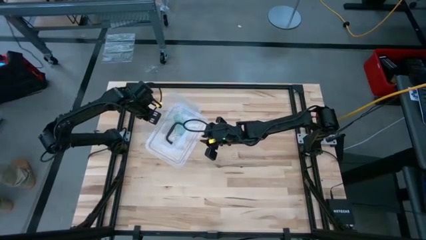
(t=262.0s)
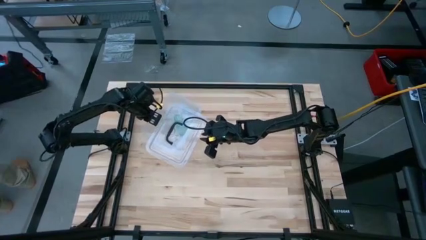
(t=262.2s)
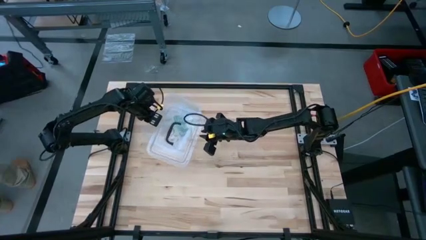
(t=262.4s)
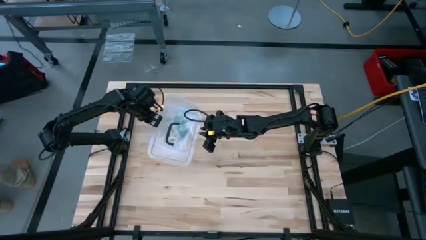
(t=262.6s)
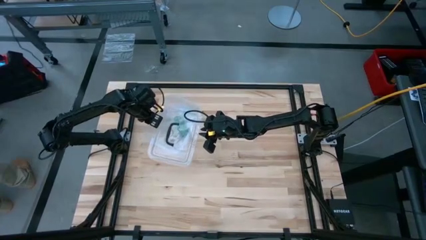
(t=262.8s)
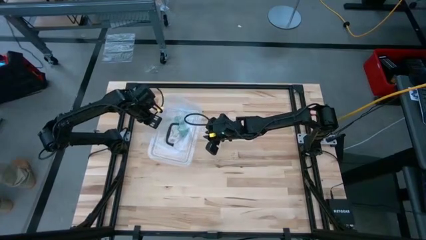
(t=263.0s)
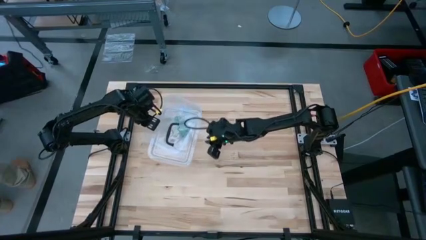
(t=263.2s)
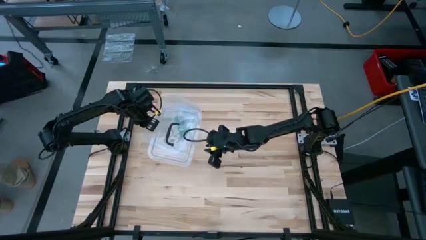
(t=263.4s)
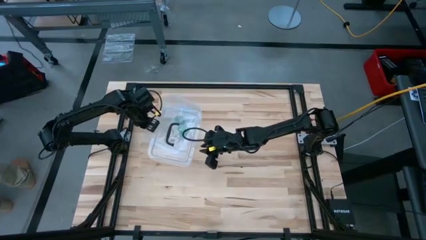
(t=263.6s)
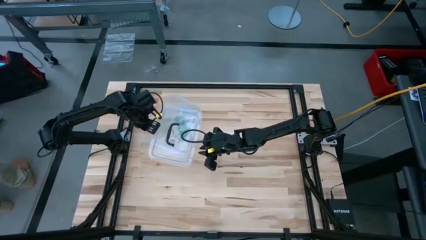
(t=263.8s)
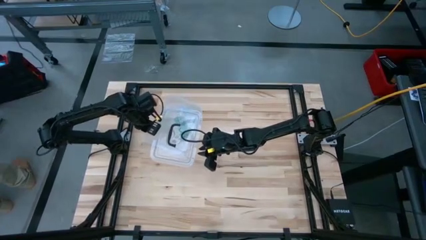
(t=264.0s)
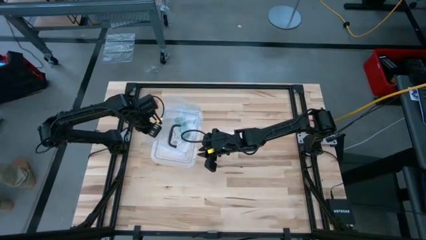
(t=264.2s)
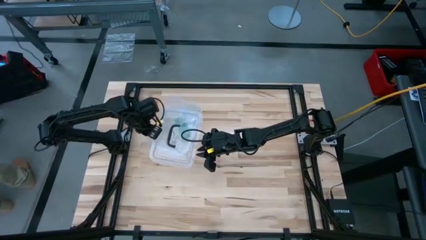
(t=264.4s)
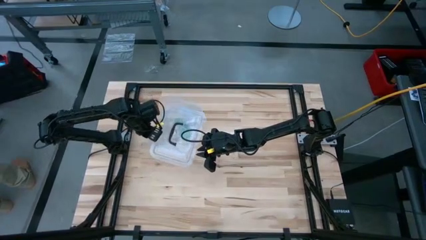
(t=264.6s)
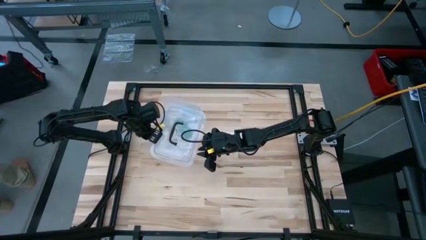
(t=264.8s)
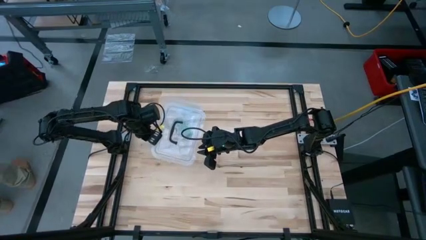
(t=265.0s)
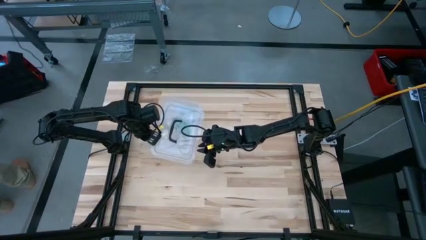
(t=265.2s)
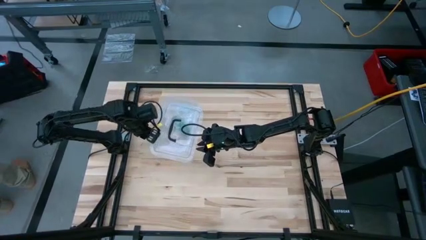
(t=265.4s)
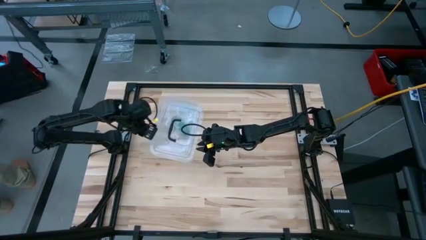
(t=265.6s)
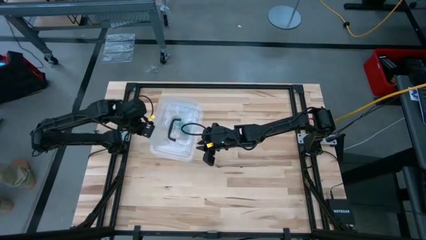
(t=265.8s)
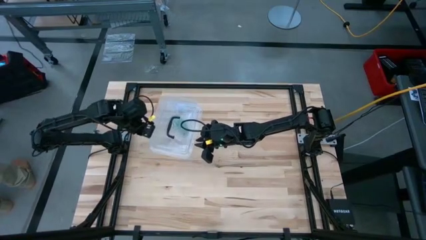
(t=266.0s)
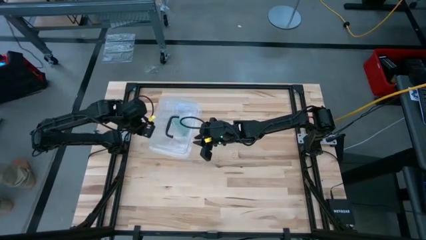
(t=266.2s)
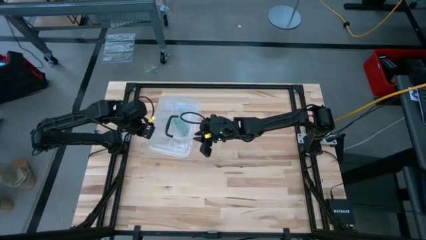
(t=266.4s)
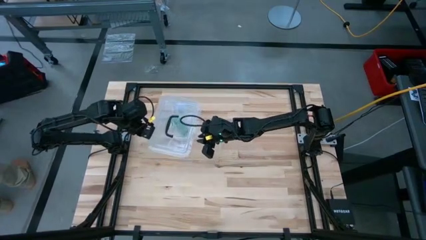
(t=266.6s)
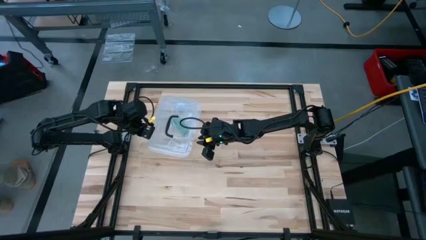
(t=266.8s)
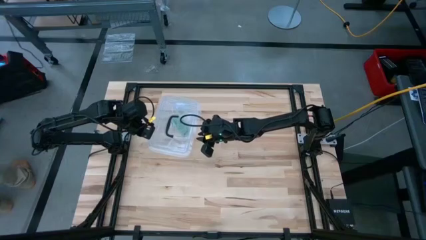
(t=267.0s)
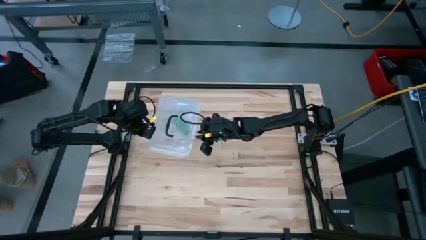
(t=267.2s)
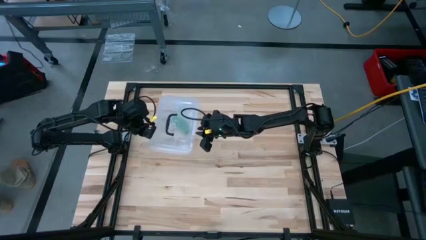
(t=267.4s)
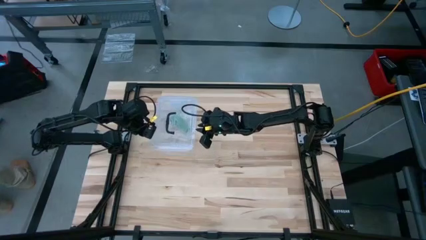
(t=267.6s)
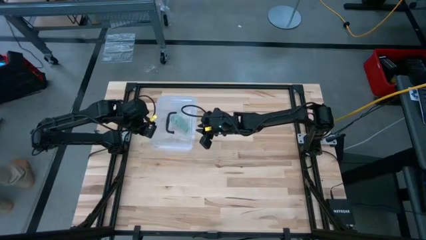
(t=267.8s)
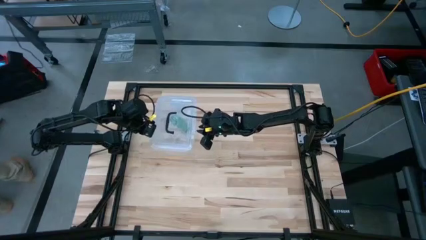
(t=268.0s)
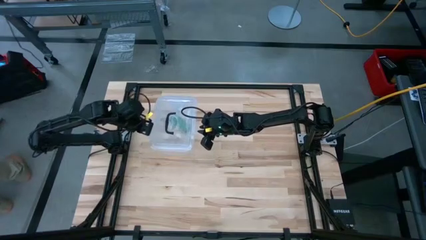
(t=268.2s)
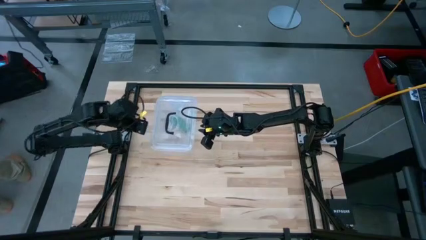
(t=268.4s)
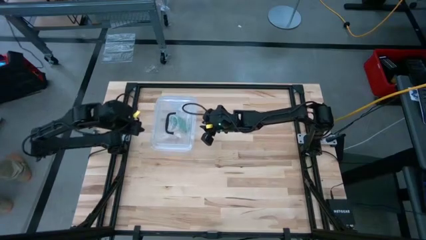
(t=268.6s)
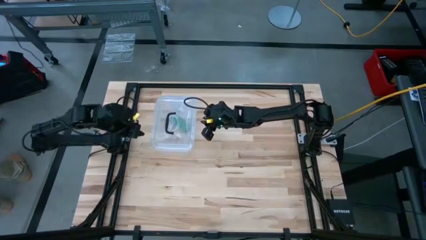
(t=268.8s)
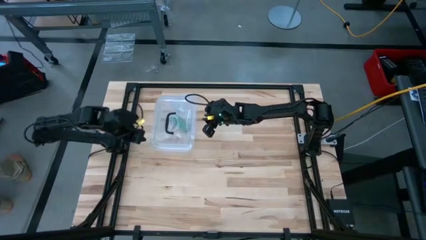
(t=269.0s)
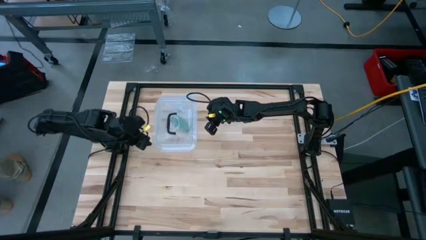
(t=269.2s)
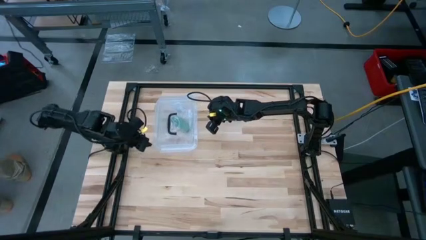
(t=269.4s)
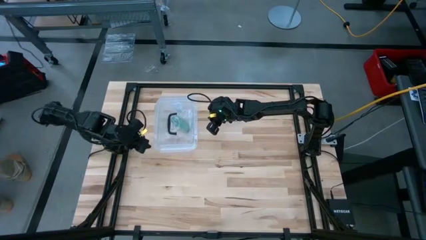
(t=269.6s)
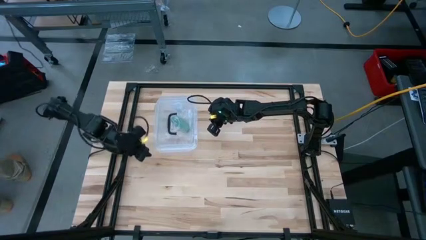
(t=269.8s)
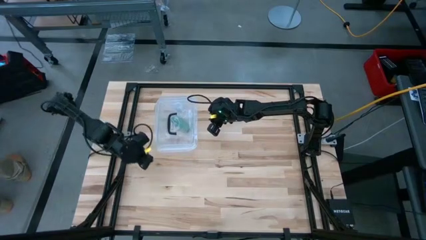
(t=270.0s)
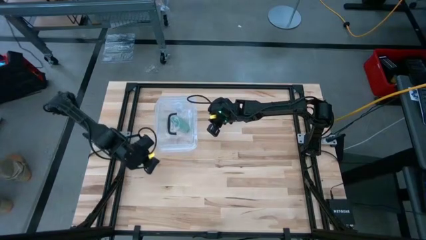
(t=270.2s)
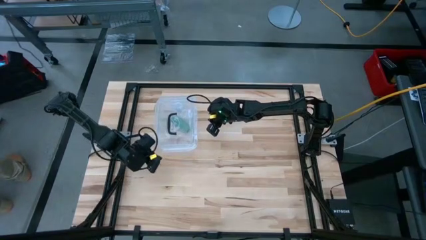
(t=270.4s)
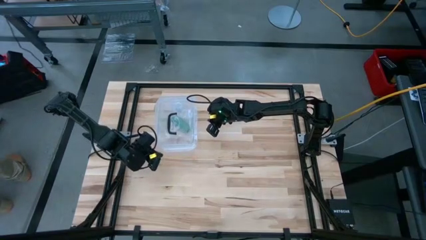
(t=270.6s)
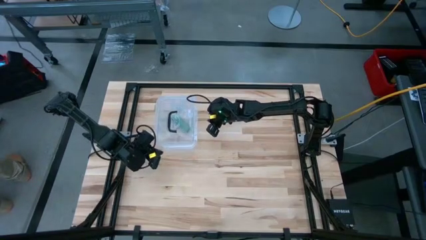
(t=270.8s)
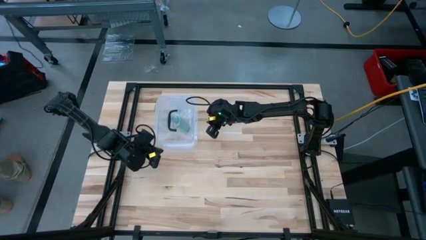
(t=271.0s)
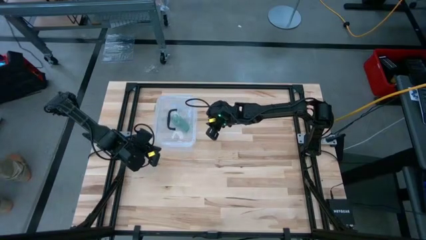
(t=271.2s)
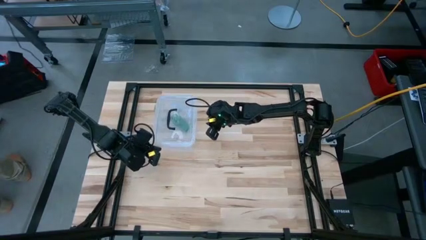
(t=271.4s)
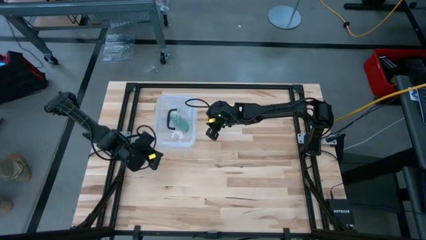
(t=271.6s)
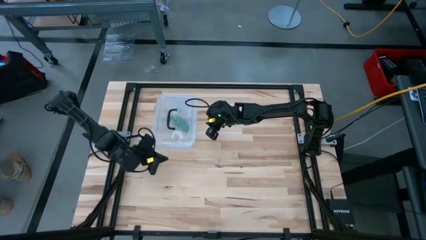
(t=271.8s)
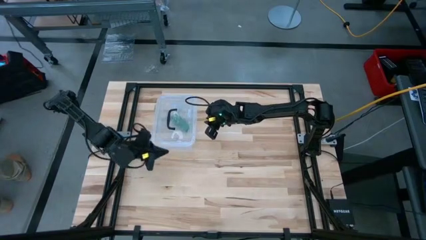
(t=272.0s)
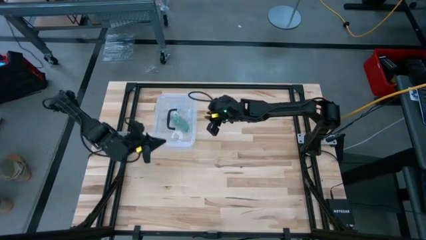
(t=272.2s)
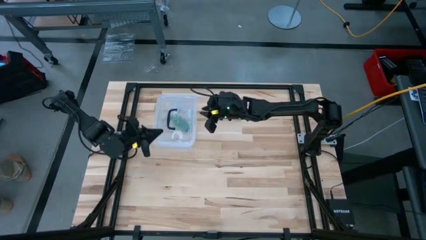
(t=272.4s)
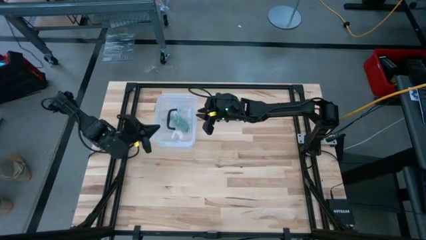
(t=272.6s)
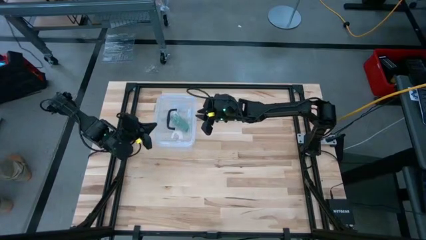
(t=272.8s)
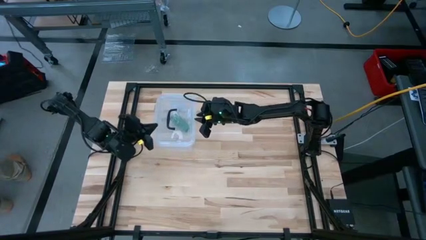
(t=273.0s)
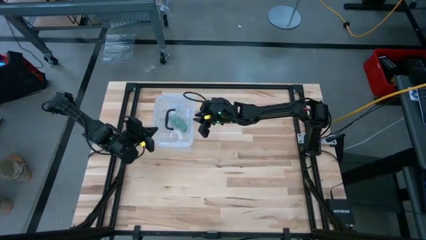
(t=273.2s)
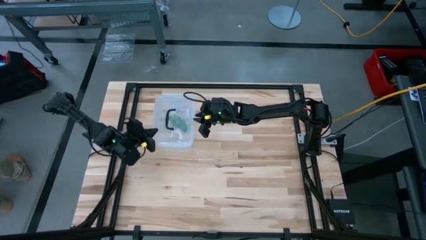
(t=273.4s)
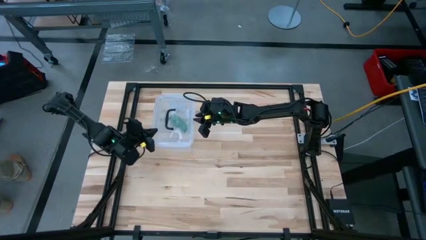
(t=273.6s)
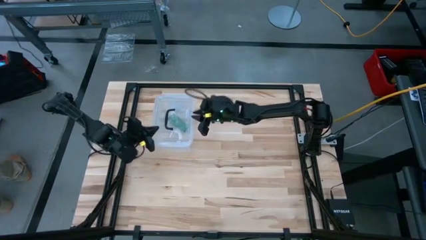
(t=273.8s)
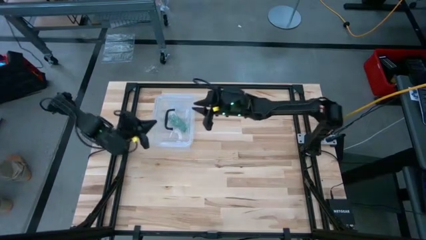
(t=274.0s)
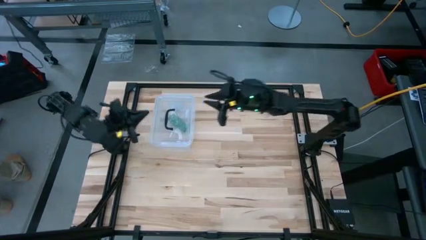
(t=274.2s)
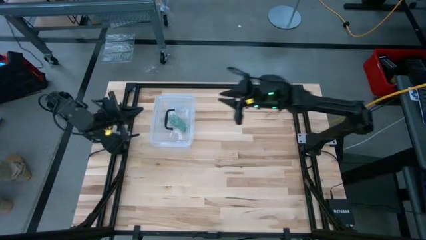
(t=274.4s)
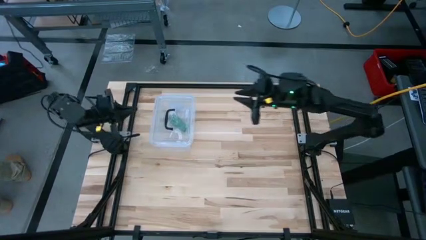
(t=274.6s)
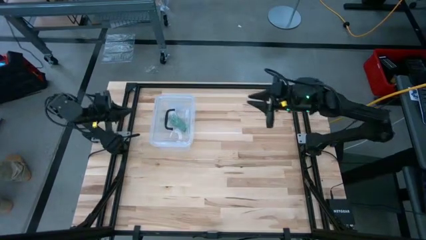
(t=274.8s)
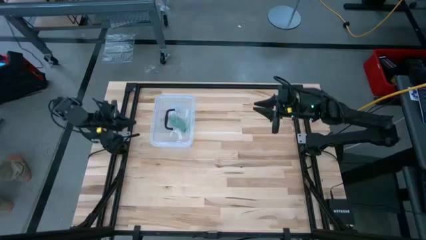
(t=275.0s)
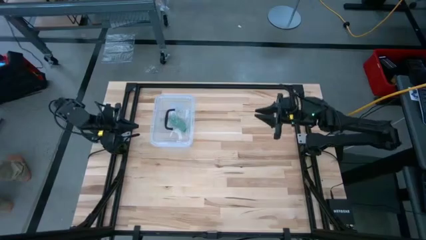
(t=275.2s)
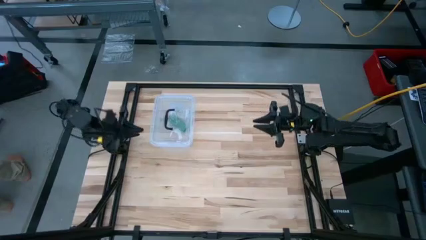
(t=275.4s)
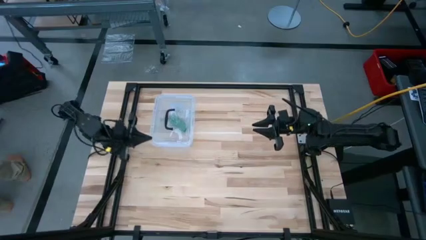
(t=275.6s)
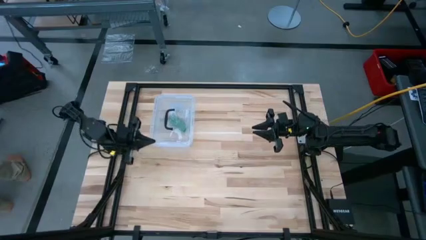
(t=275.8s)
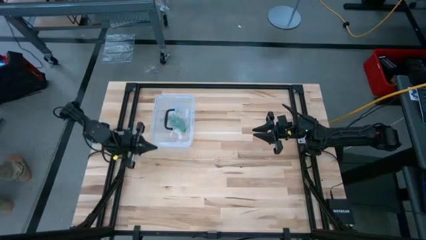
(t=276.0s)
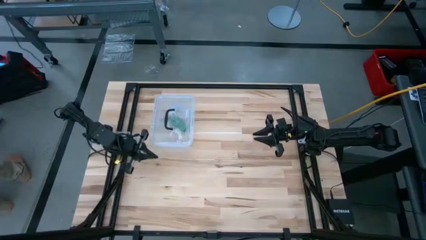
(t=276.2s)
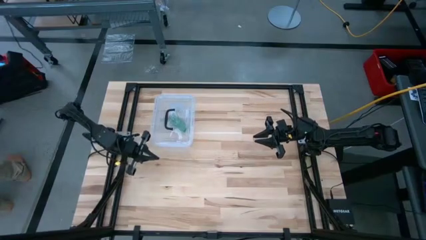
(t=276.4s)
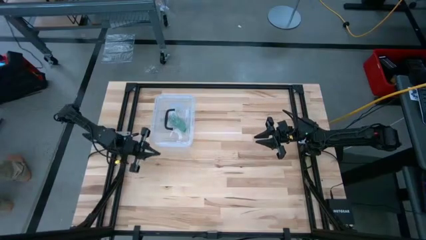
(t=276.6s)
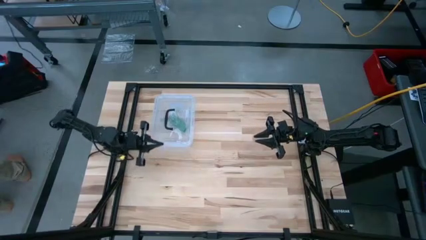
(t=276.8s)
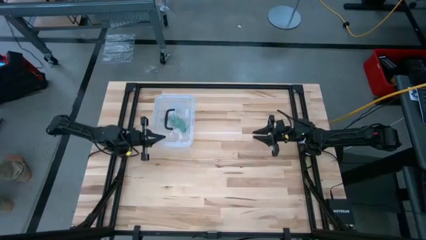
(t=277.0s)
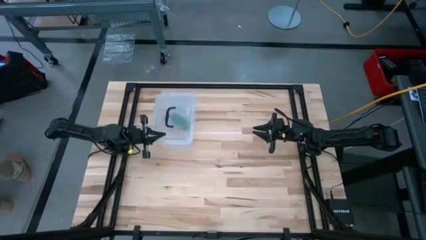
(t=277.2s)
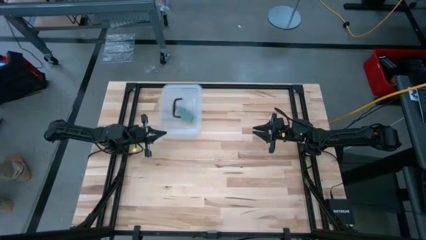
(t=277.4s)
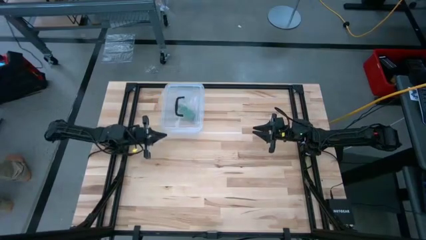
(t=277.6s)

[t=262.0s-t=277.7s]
Task: Roll bandage
Close the transparent bin with the transparent bin cover
